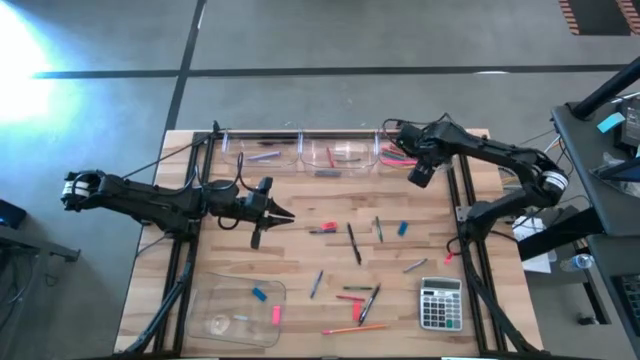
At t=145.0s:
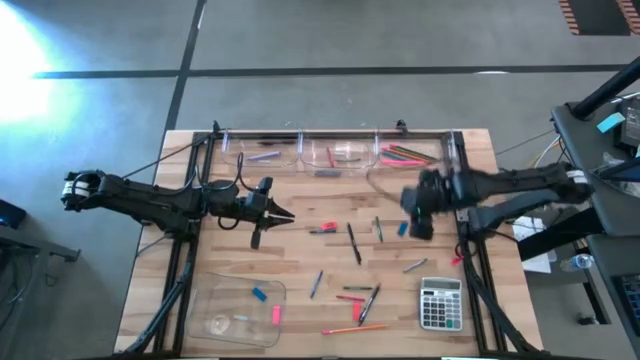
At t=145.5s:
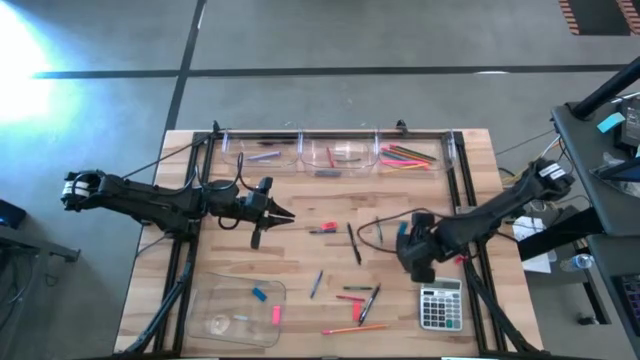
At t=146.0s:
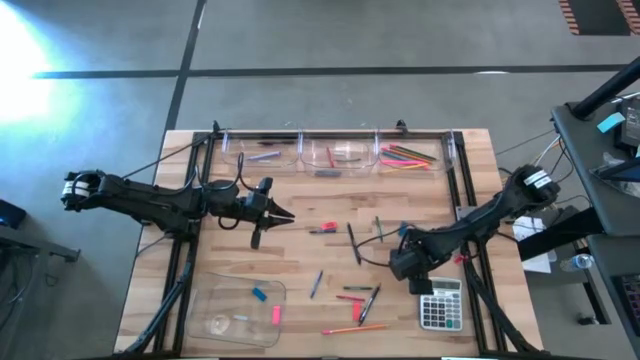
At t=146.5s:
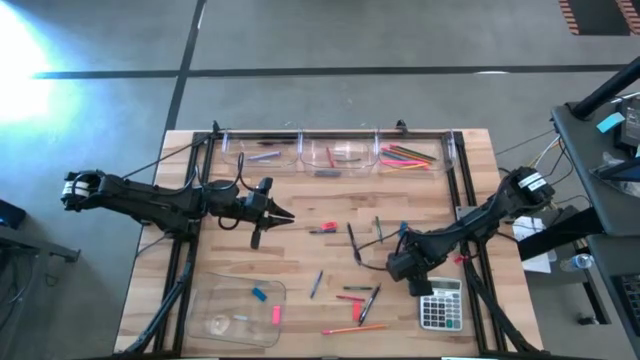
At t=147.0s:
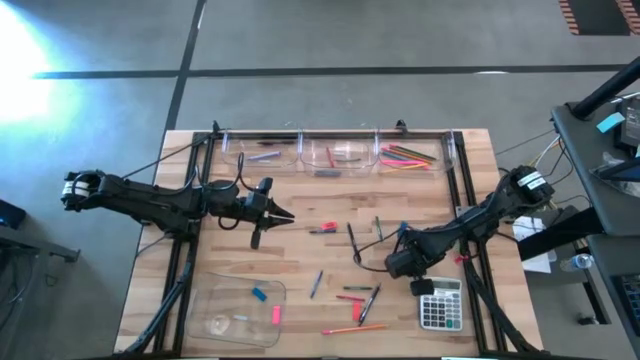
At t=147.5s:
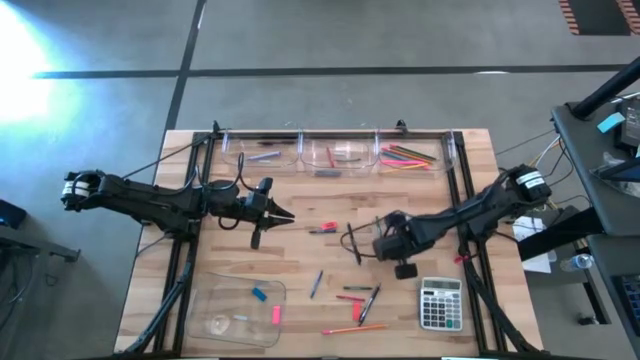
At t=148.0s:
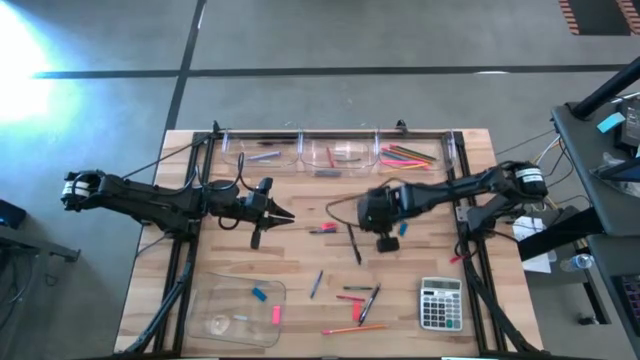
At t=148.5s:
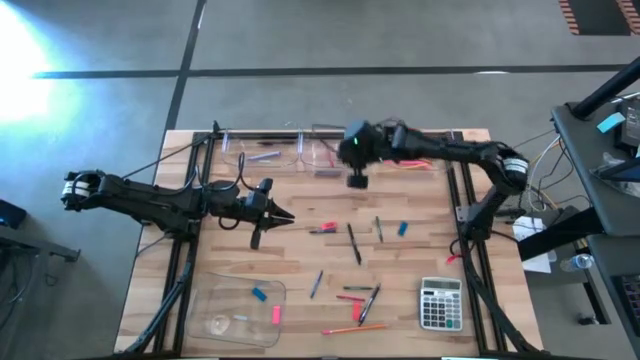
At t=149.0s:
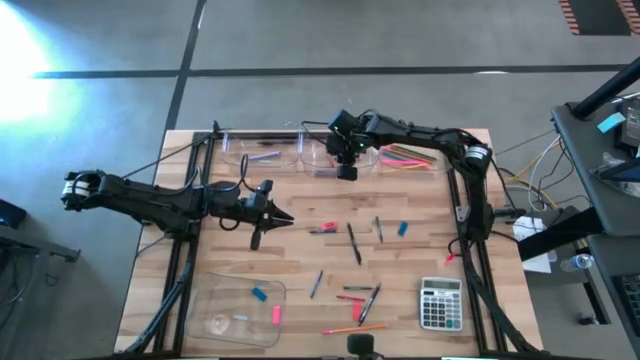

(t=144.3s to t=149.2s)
Task: Sort crayons/erasers/pens/pencils in bins
Put the gray crayon into the top middle transparent bin

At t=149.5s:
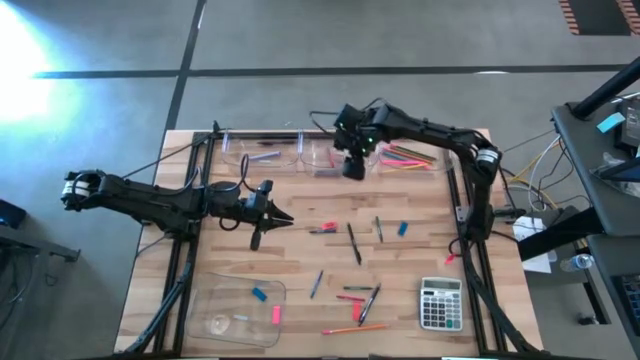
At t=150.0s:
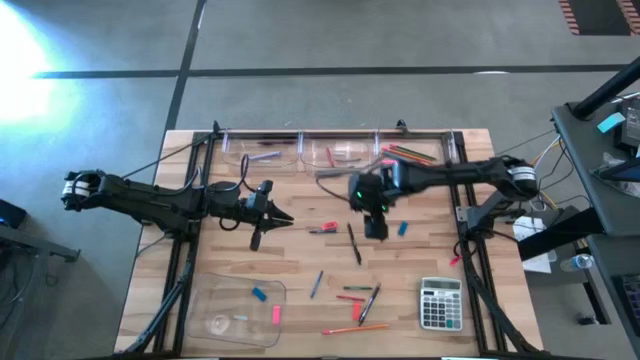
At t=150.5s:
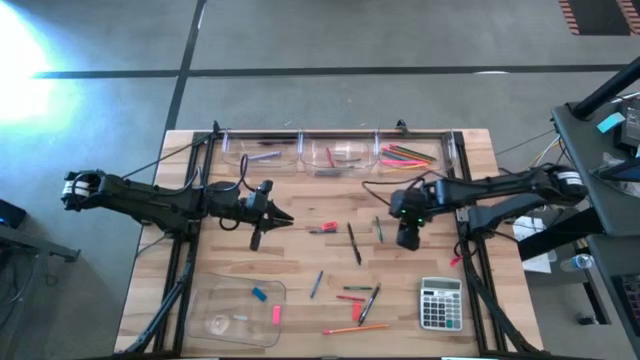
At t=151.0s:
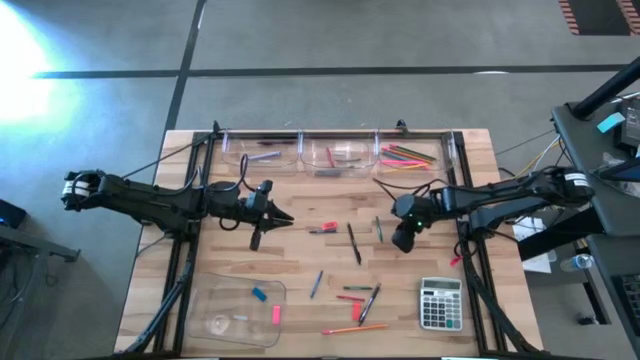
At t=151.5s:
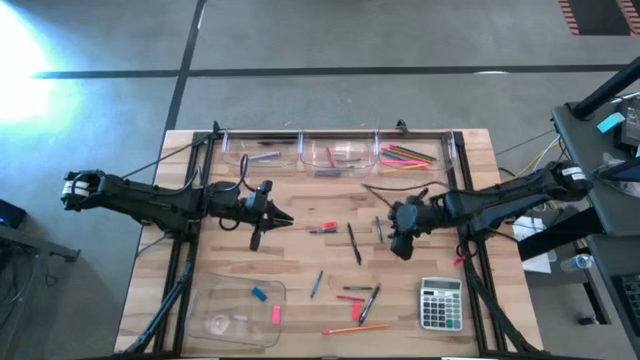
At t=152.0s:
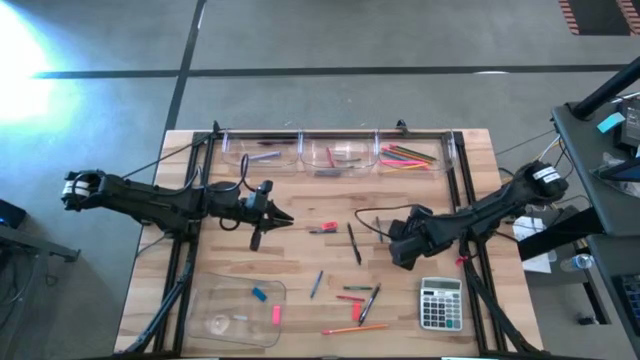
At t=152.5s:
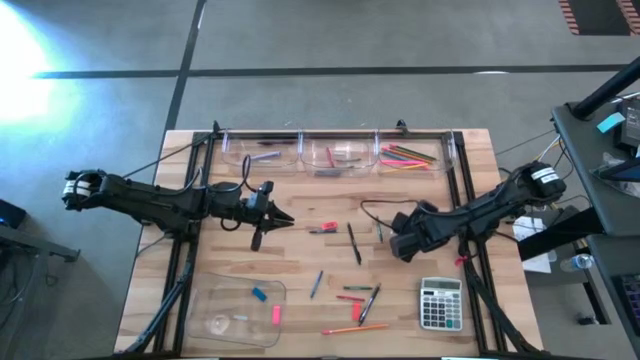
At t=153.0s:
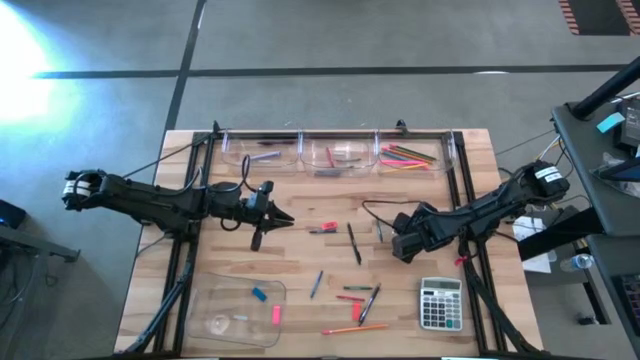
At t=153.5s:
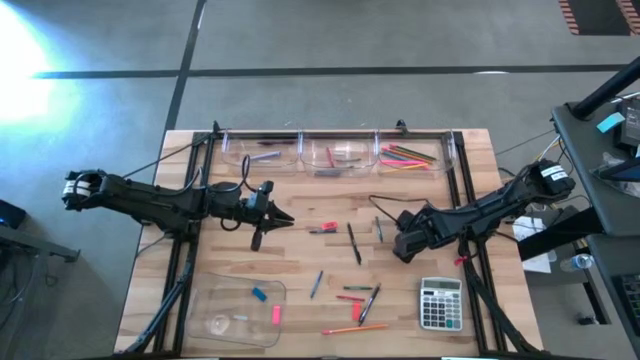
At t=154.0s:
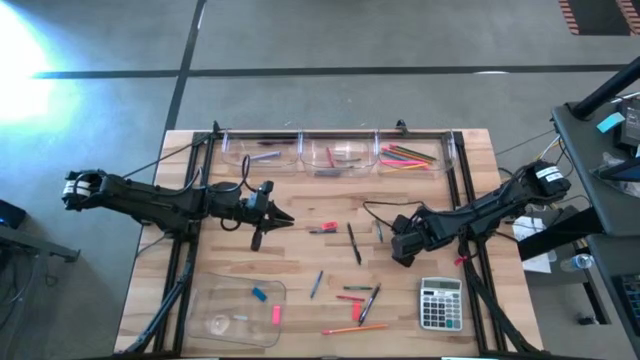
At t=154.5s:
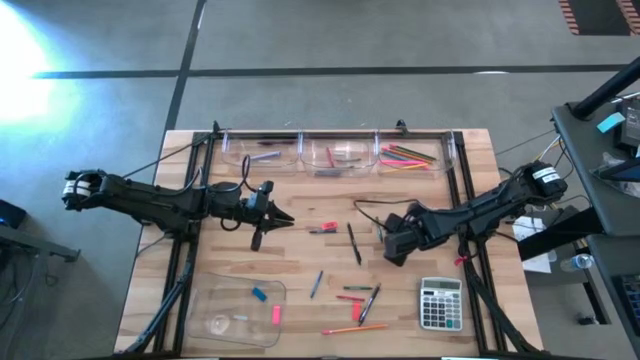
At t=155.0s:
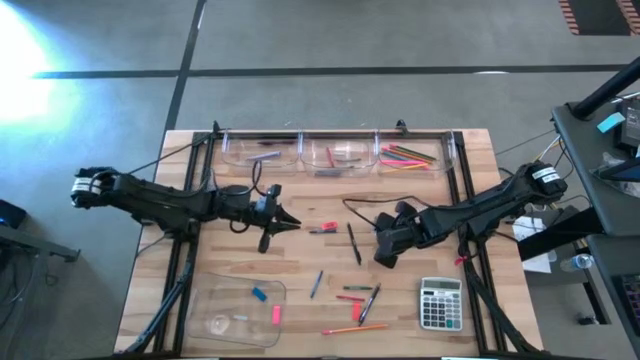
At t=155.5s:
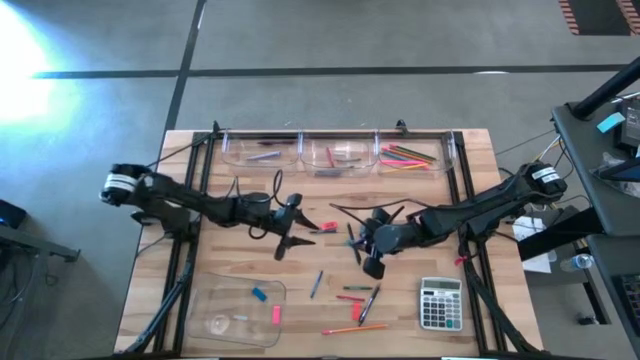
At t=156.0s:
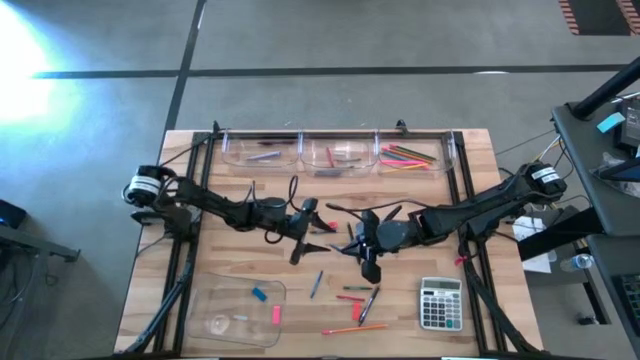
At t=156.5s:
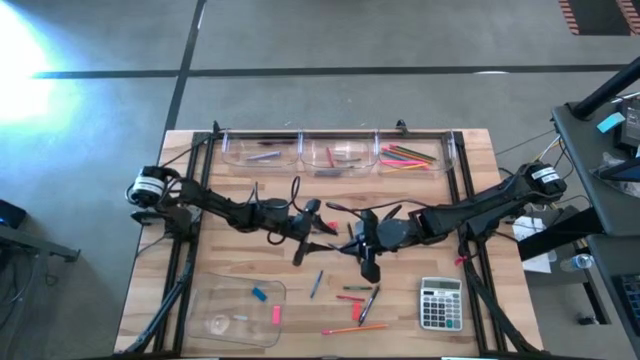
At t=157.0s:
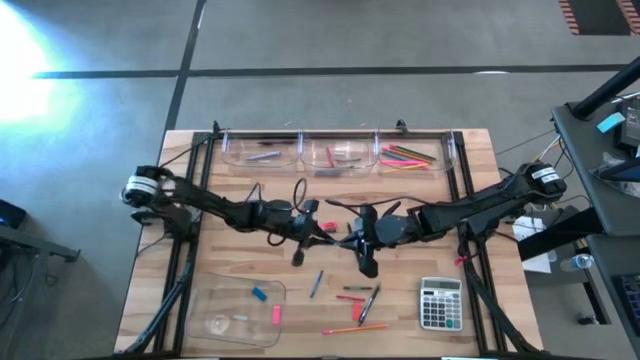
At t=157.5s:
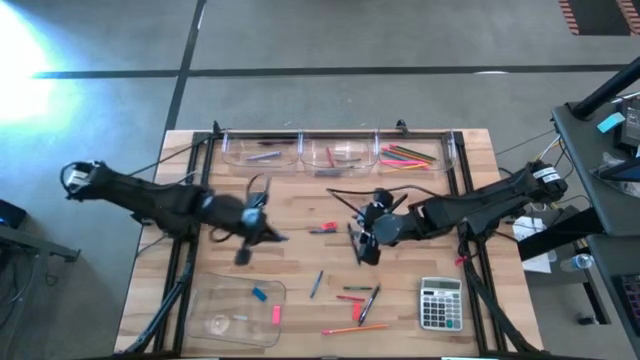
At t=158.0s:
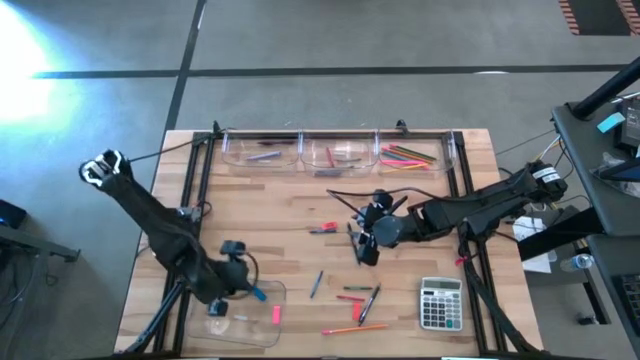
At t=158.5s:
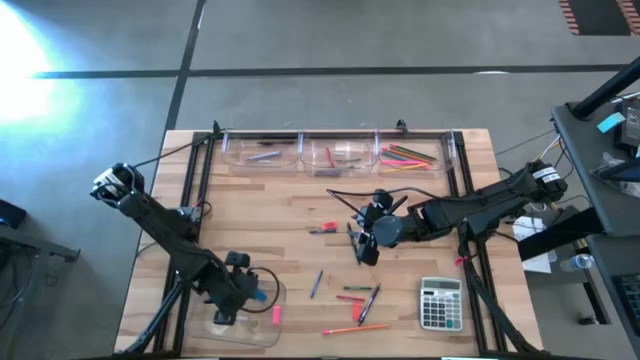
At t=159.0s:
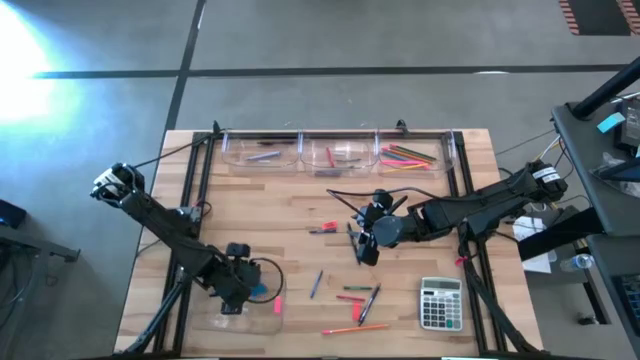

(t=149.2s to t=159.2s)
Put the blue eraser into the bottom transparent bin

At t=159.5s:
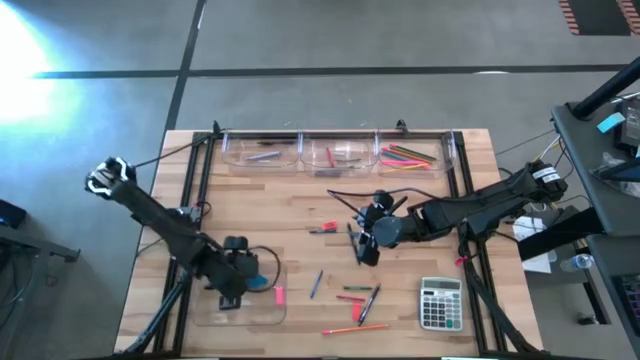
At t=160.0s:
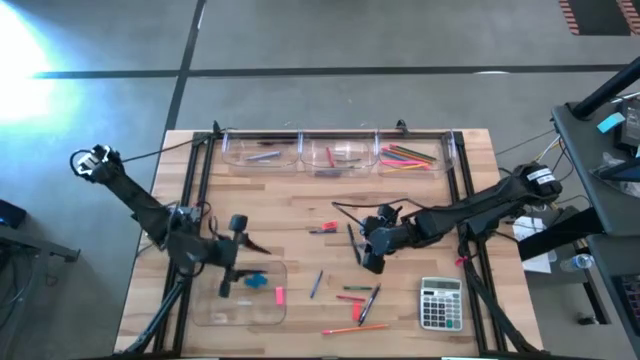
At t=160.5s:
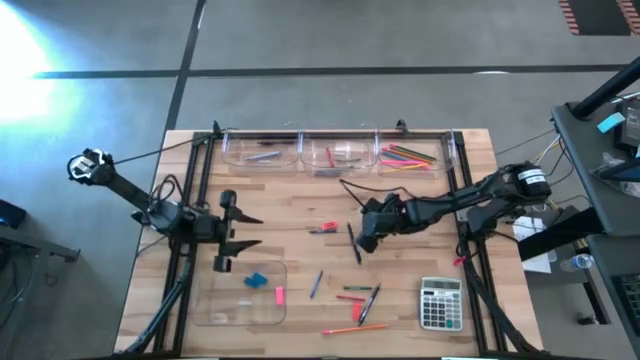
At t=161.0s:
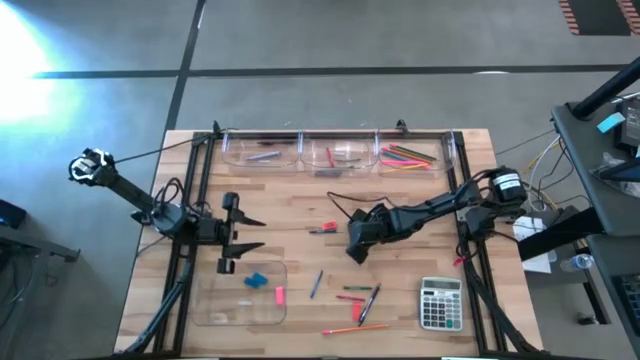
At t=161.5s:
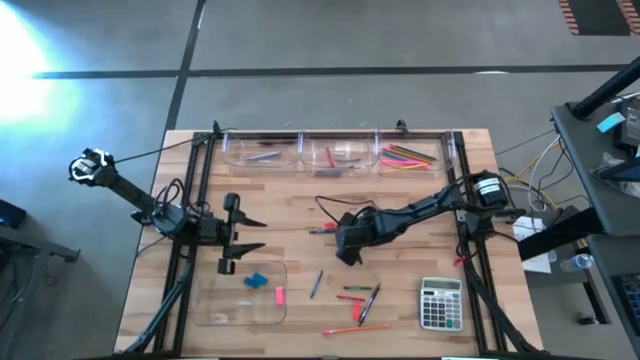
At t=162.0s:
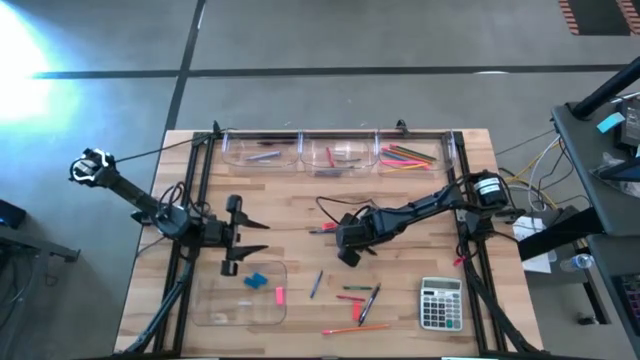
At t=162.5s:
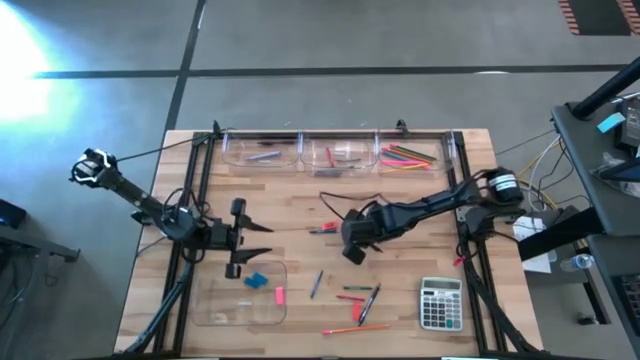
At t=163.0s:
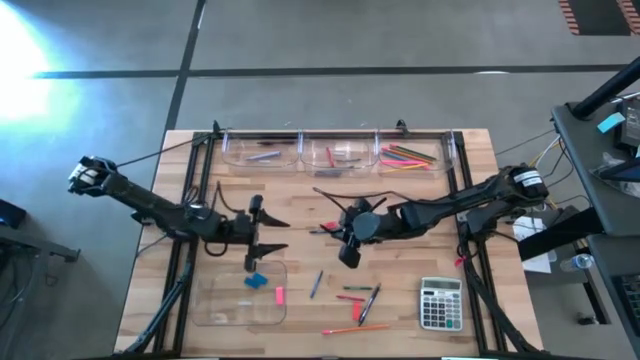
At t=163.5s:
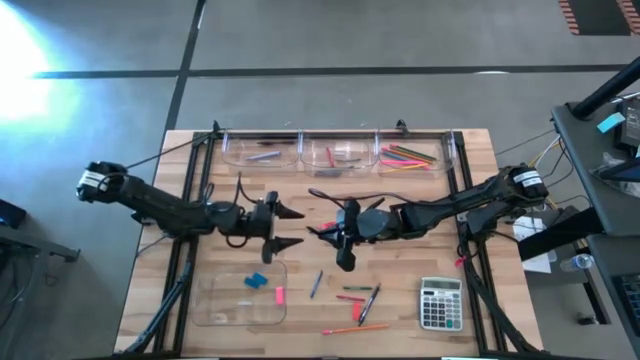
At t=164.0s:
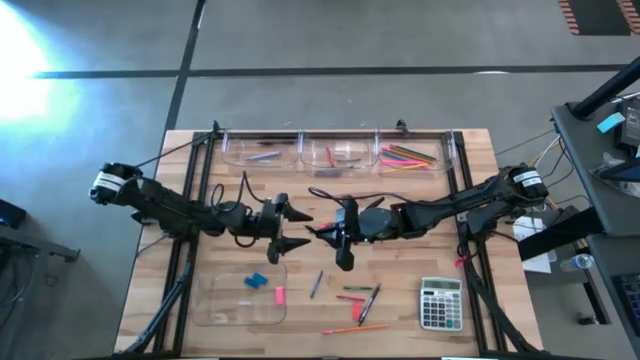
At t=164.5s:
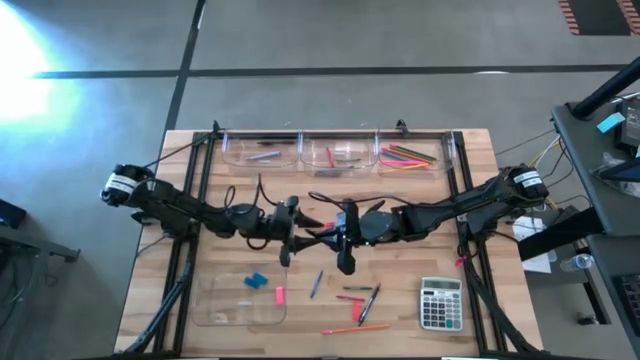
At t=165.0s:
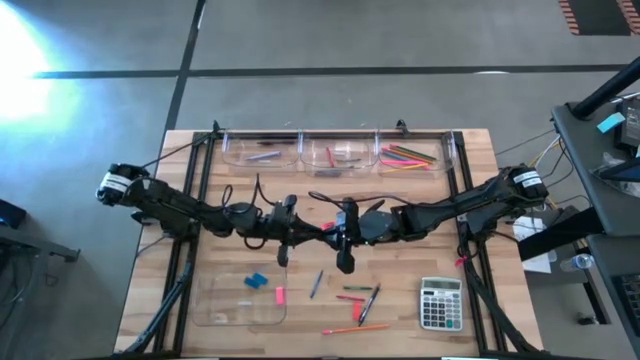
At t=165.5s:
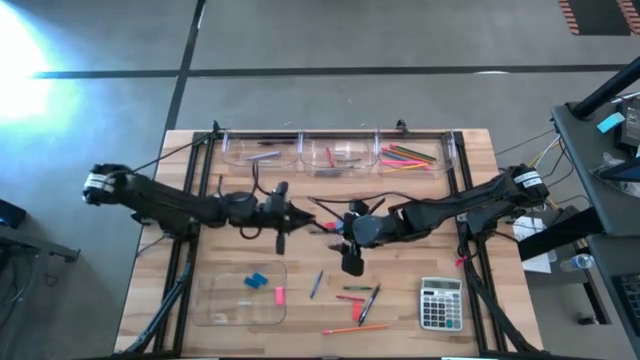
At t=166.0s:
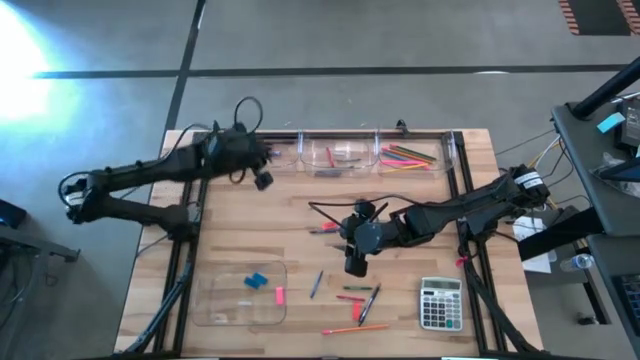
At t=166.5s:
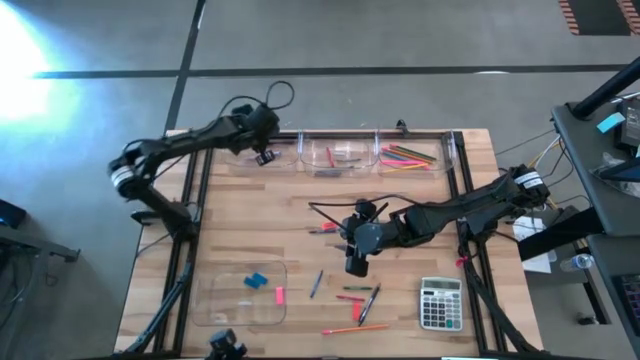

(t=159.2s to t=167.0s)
Put the black pen into the top left transparent bin
